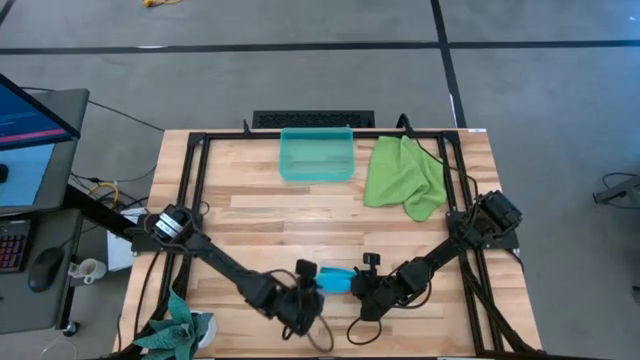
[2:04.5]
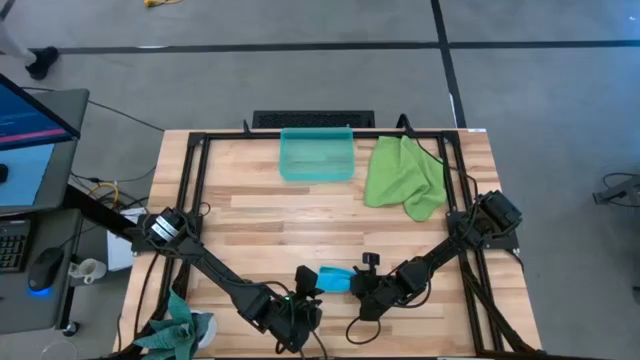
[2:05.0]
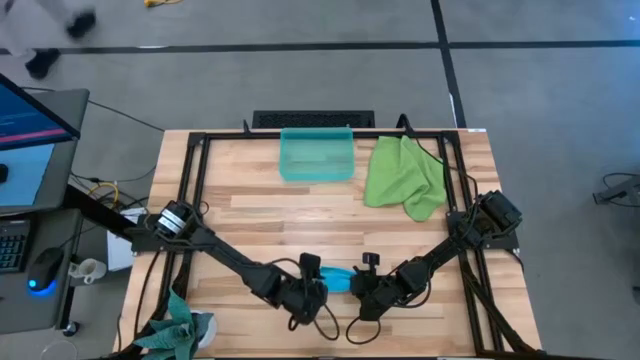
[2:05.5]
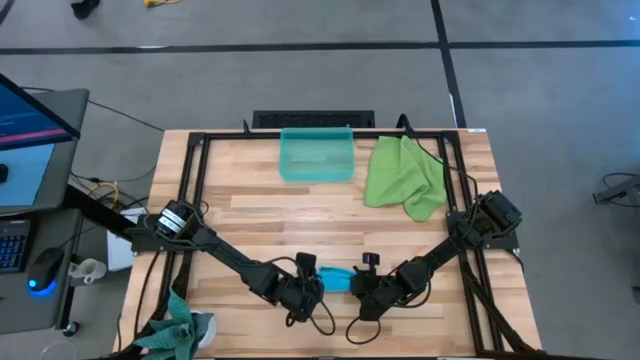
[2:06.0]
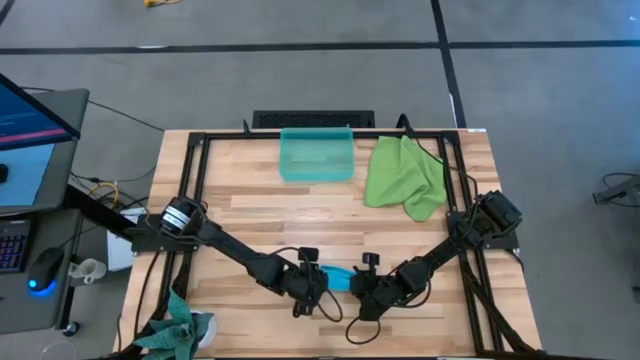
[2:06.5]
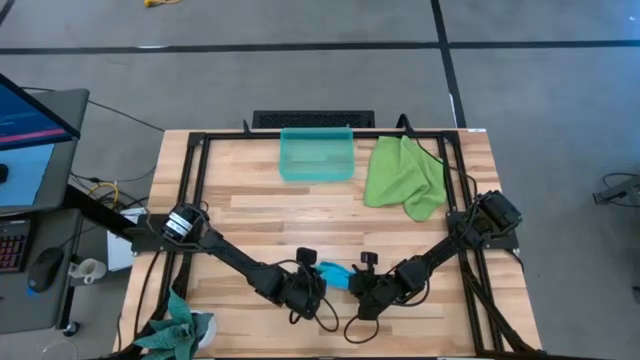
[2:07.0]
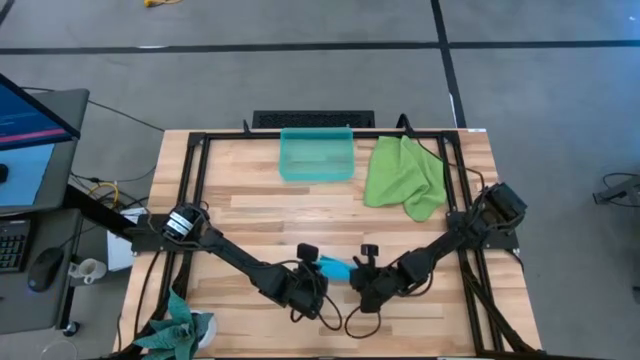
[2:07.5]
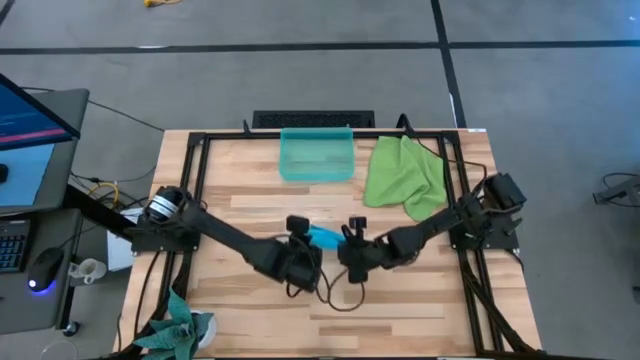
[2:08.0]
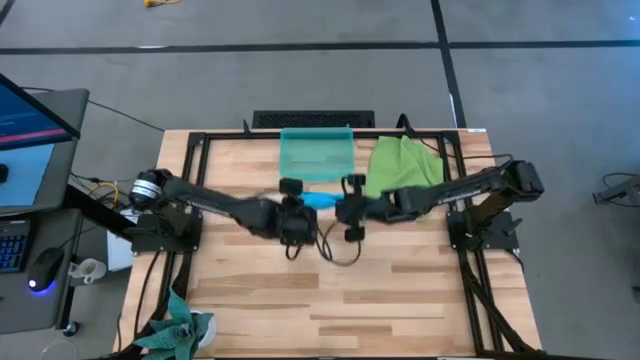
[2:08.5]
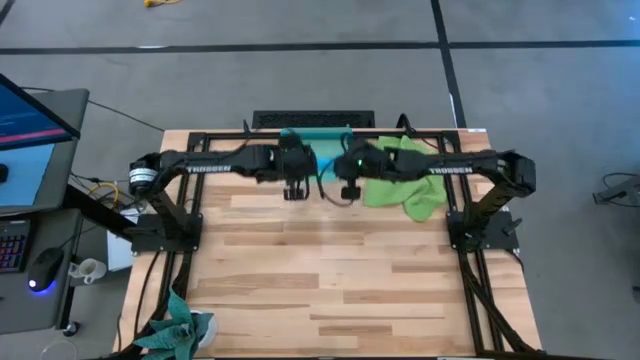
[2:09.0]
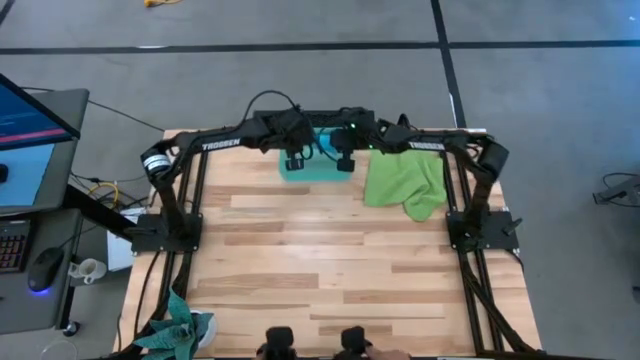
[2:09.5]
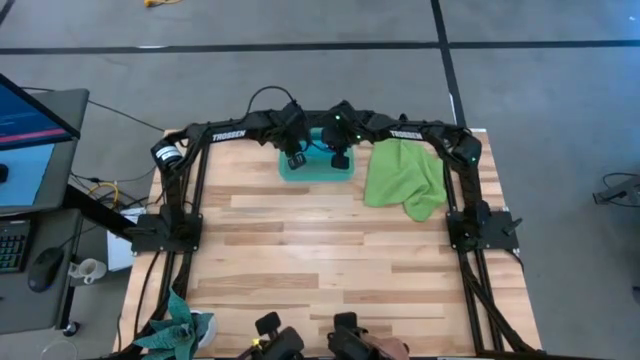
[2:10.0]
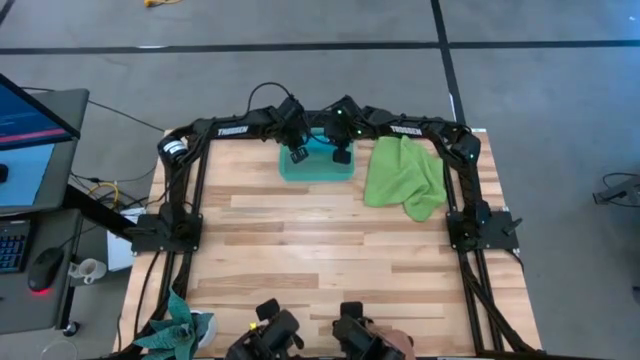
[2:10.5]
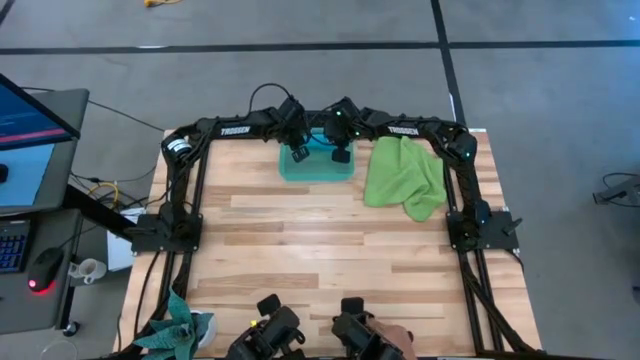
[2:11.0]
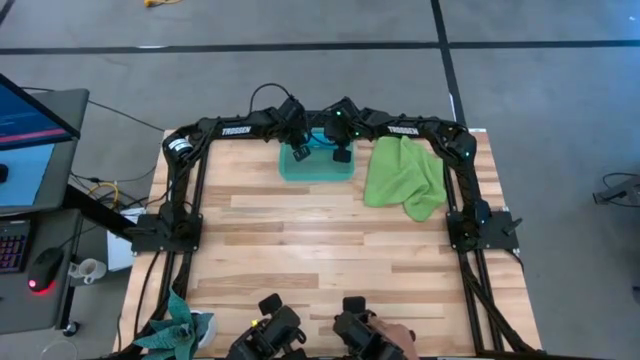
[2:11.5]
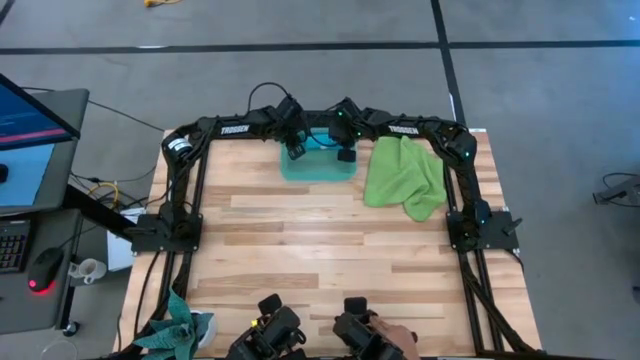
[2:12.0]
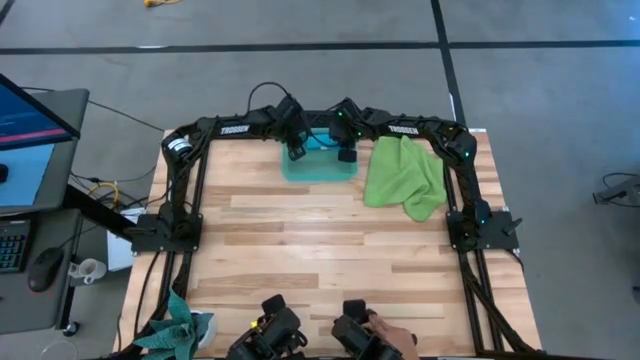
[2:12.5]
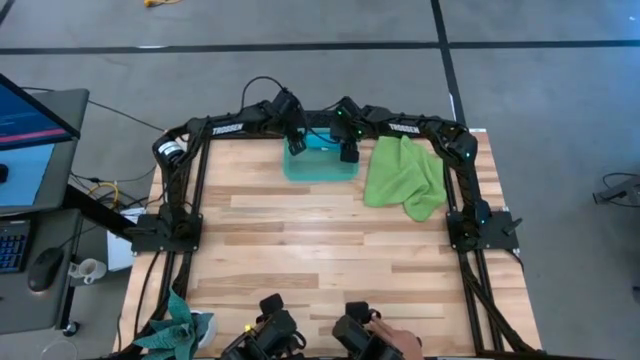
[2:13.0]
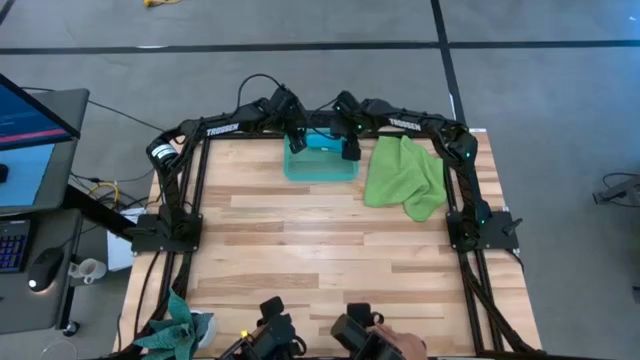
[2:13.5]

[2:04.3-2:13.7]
Task: Roll microfiber towels into tight, uniform cylinder then place into a basket
Put the blue microfiber cloth into the blue bin

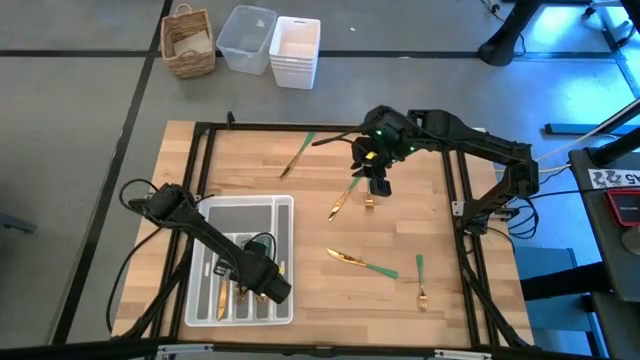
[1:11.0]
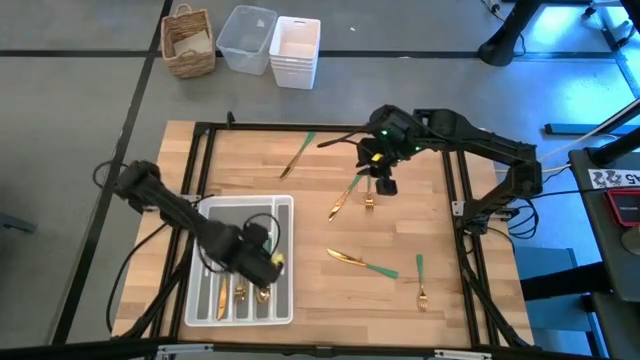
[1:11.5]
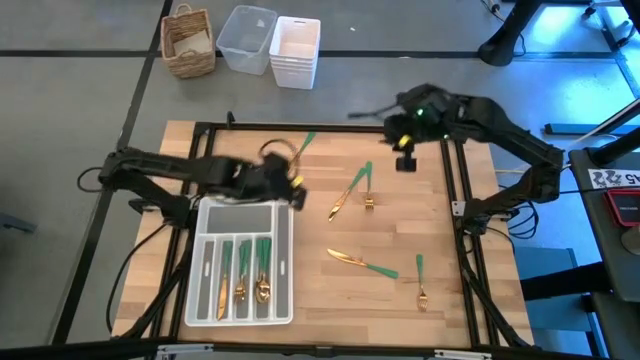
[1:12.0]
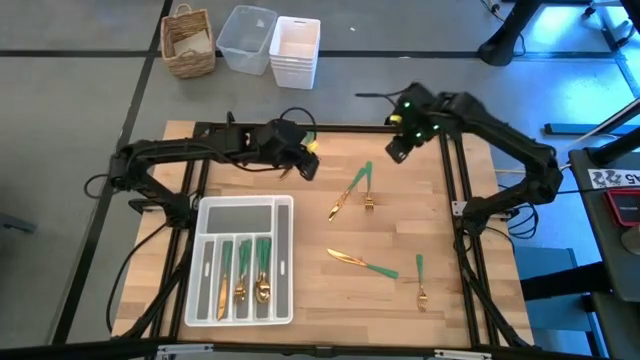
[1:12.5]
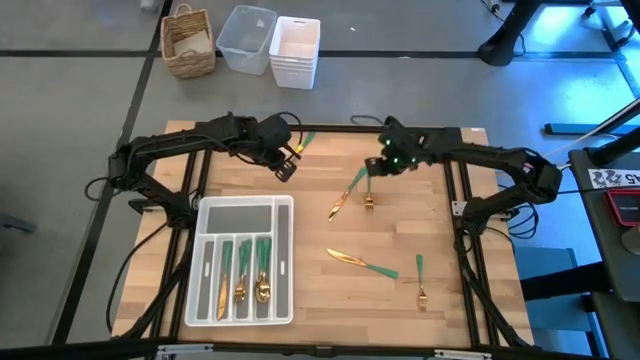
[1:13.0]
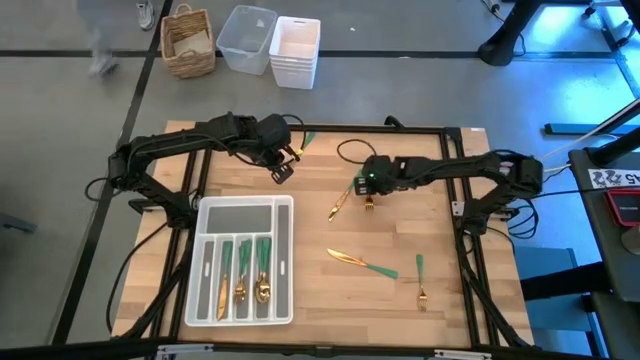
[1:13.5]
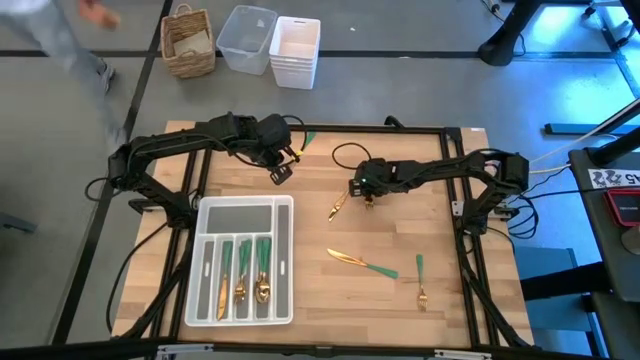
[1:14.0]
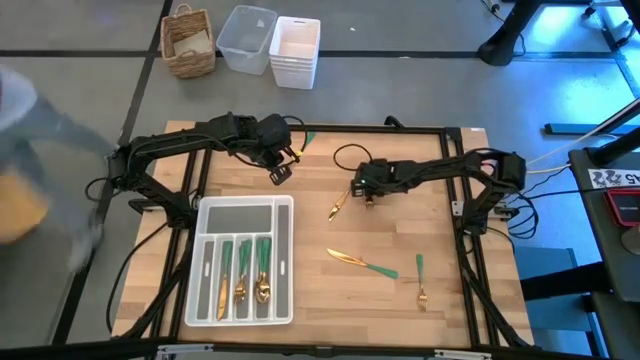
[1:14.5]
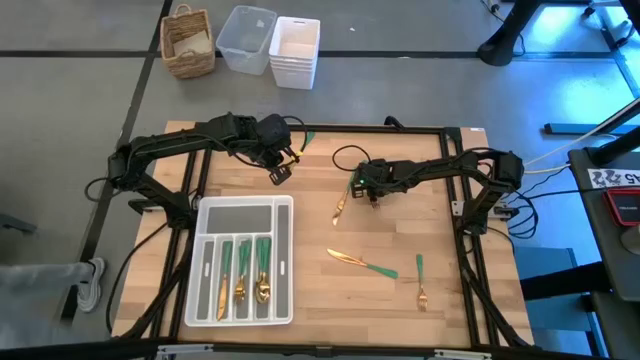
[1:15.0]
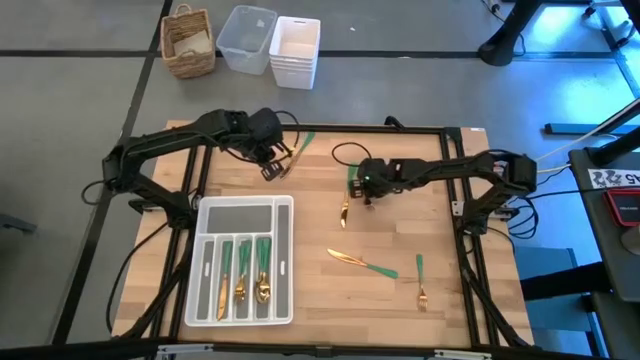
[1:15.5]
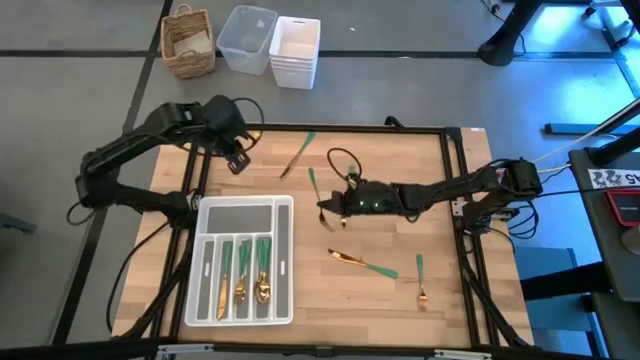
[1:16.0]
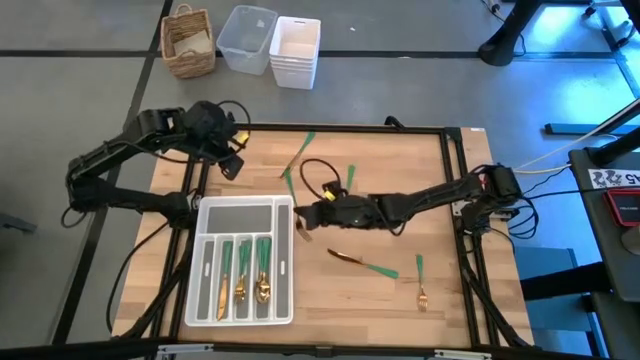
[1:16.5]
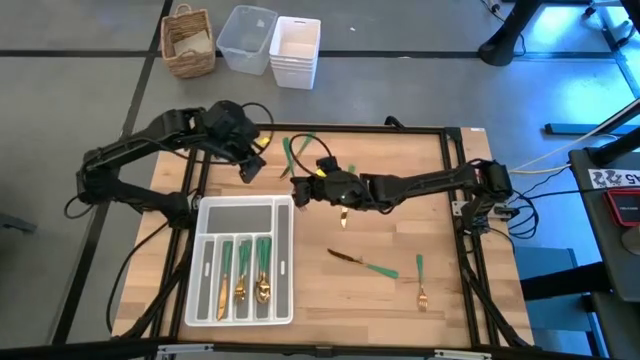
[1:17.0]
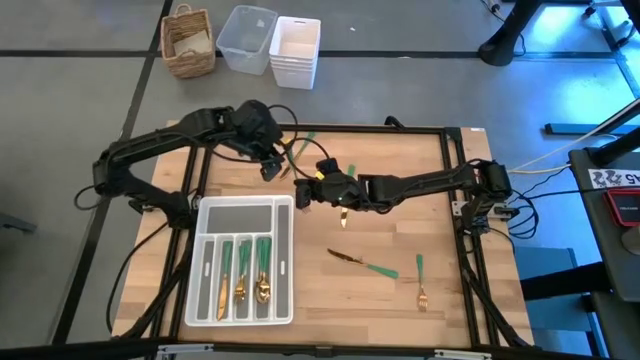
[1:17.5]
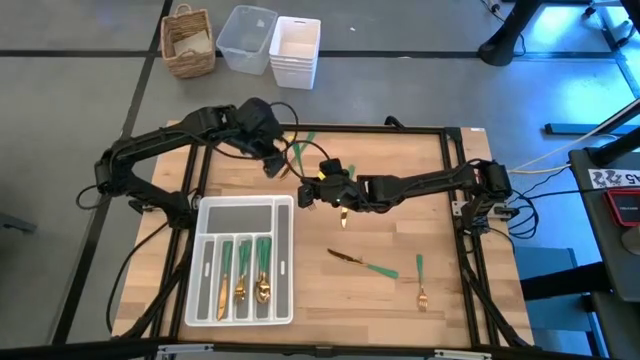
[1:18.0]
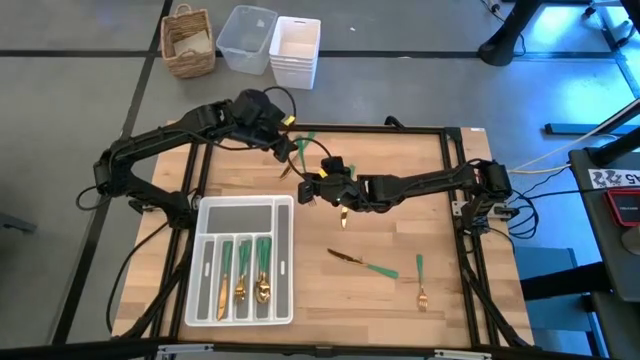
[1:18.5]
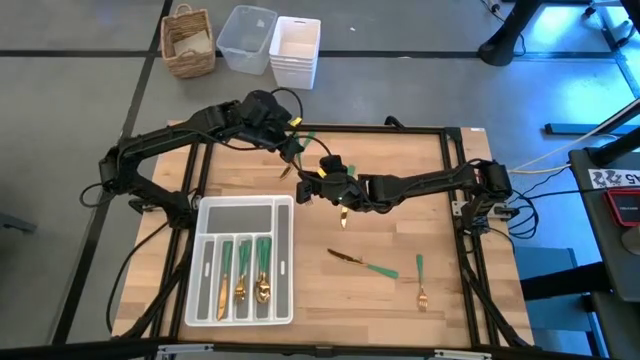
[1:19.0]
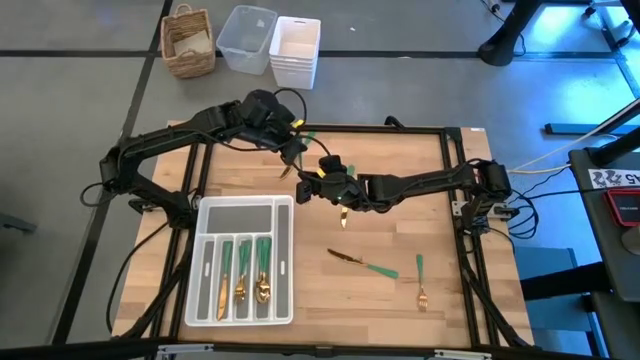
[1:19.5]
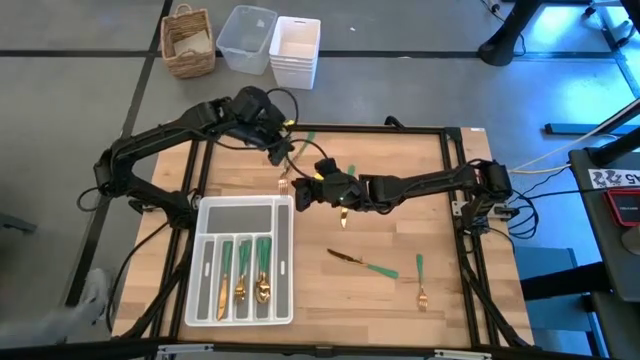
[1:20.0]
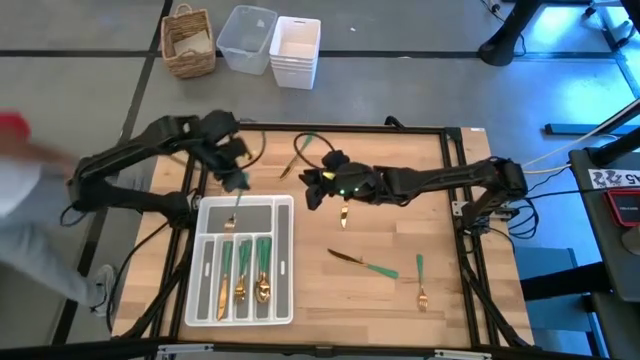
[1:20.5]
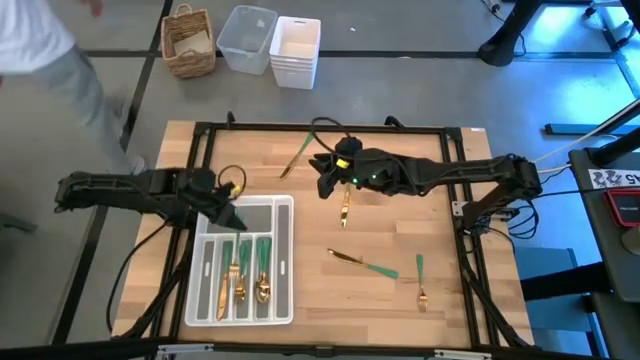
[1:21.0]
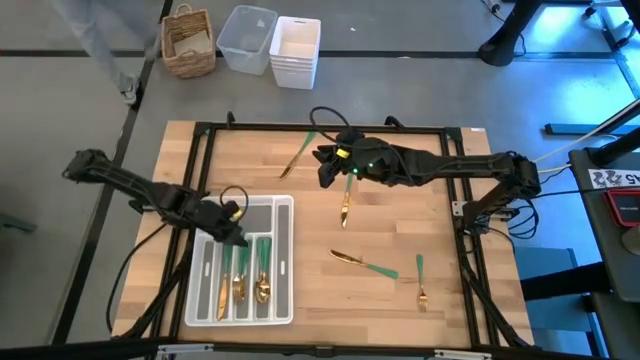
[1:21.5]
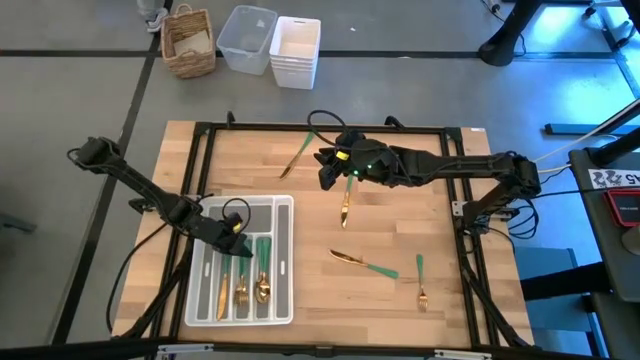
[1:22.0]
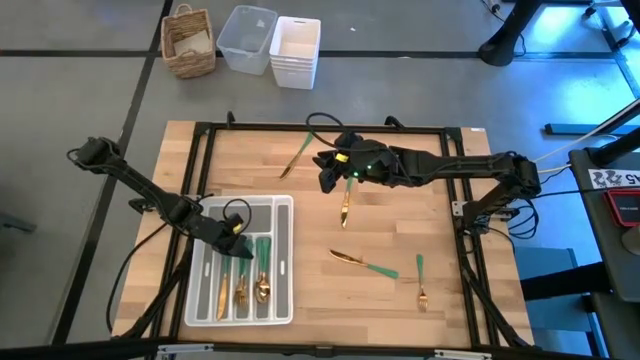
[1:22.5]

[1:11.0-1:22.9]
Task: Sort silverware
Put the green fork on the silverware tray
